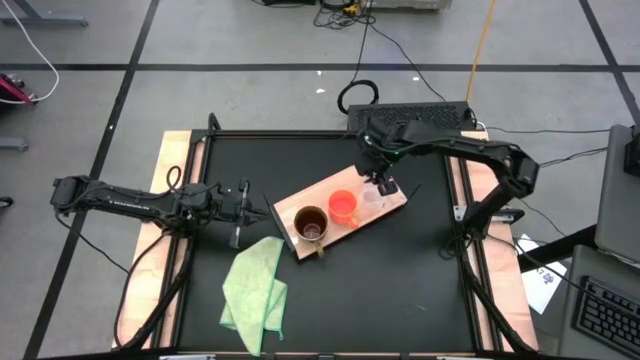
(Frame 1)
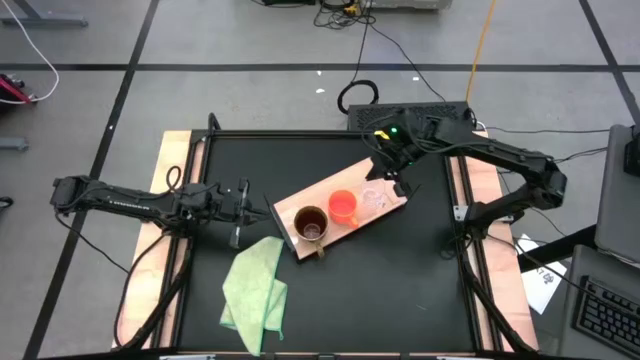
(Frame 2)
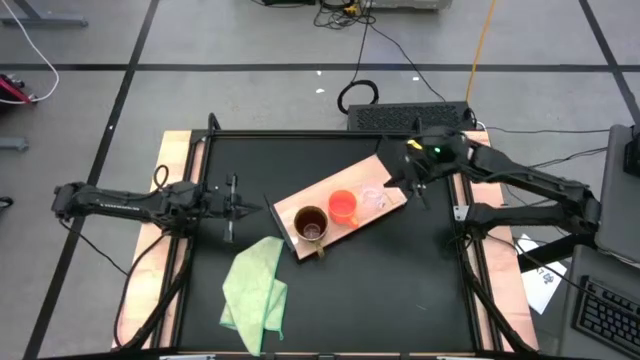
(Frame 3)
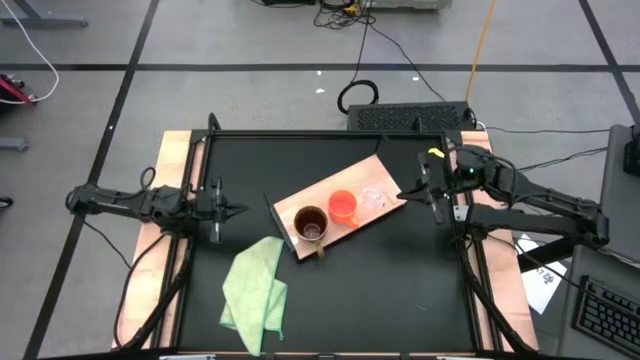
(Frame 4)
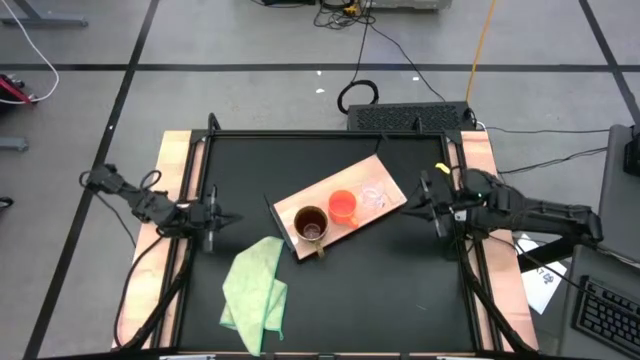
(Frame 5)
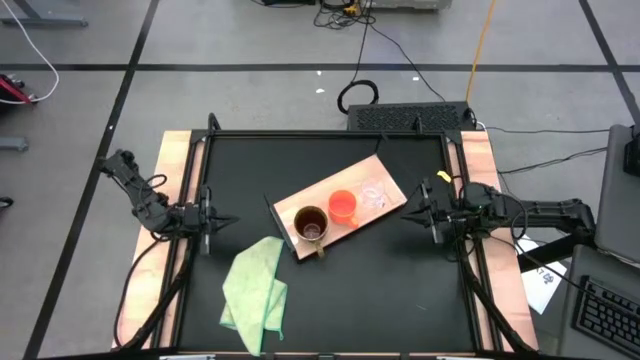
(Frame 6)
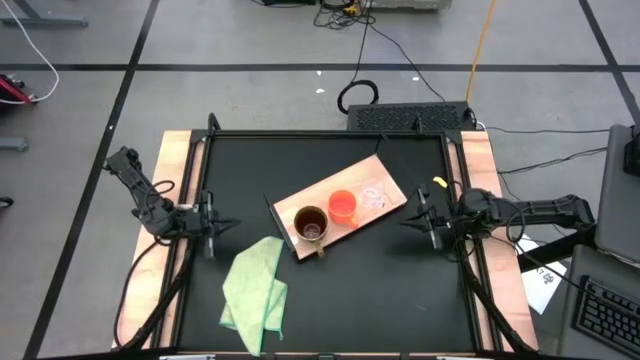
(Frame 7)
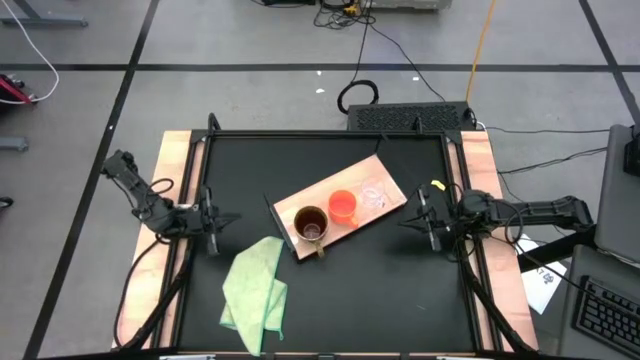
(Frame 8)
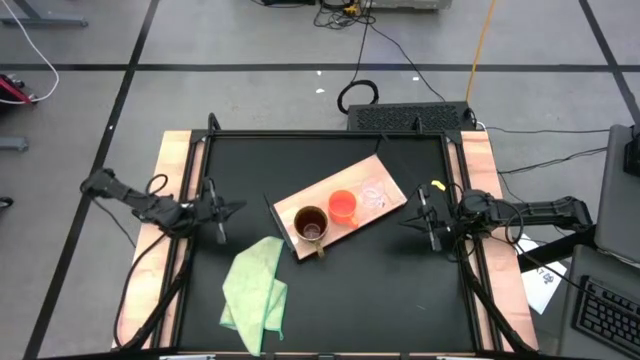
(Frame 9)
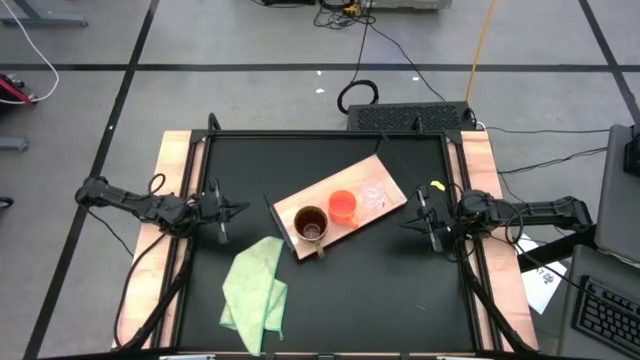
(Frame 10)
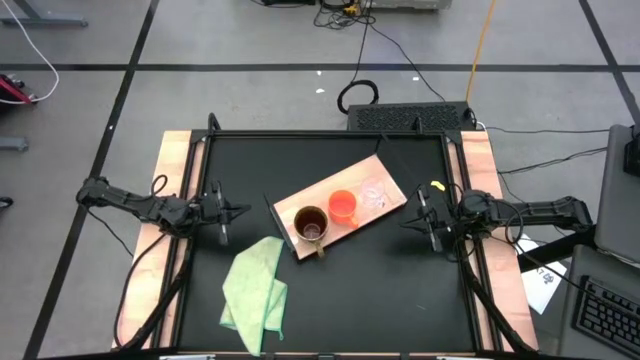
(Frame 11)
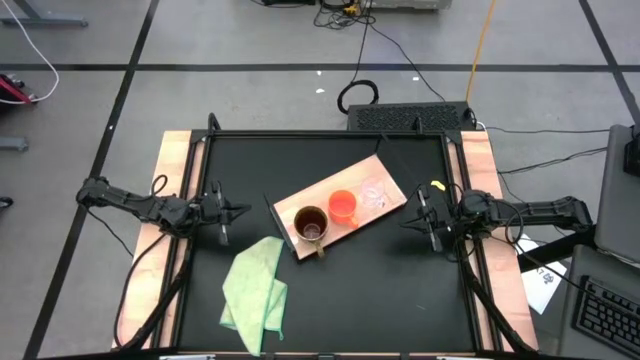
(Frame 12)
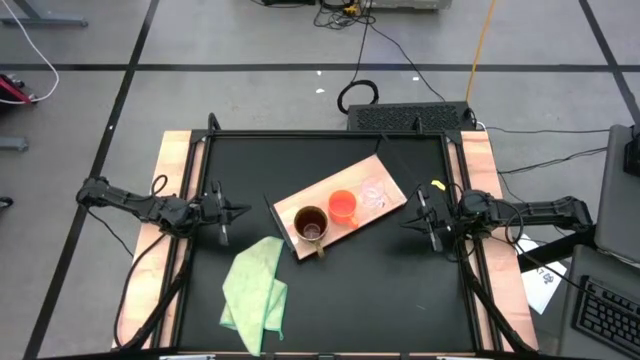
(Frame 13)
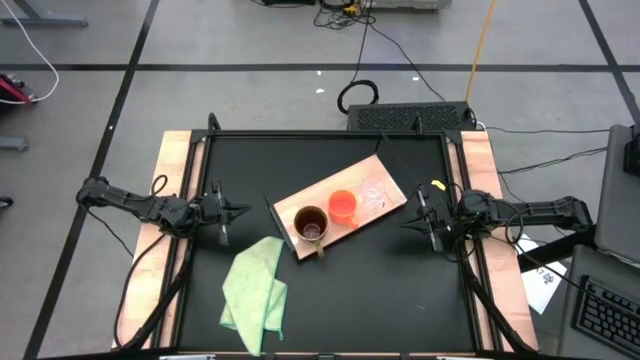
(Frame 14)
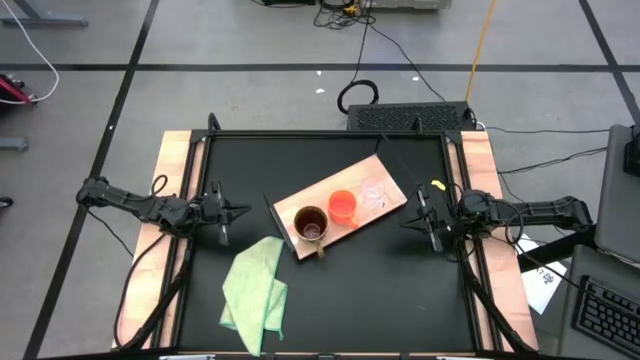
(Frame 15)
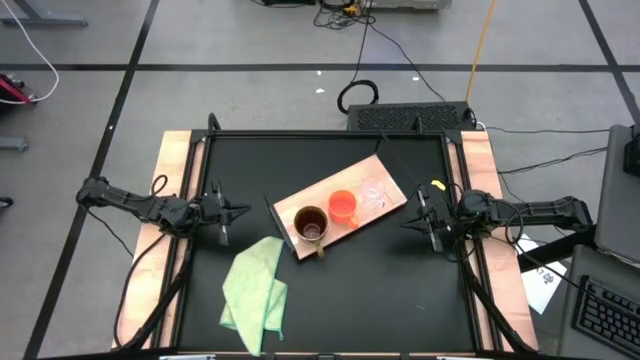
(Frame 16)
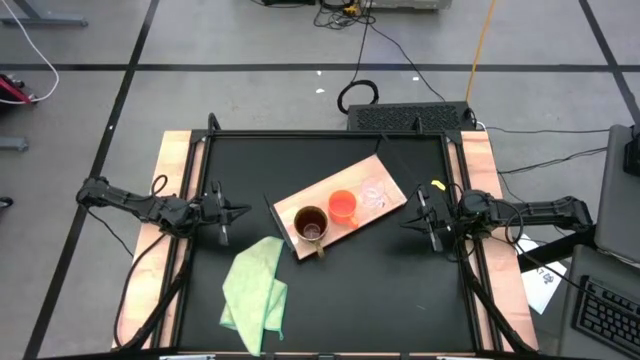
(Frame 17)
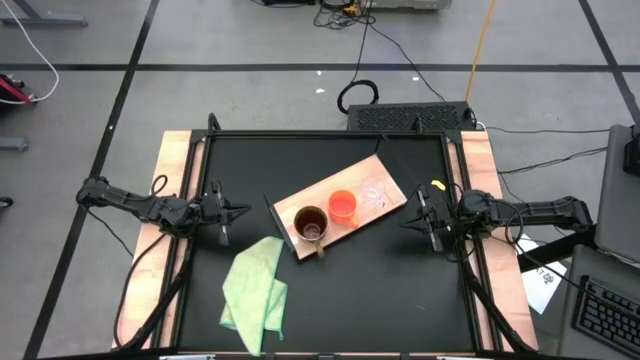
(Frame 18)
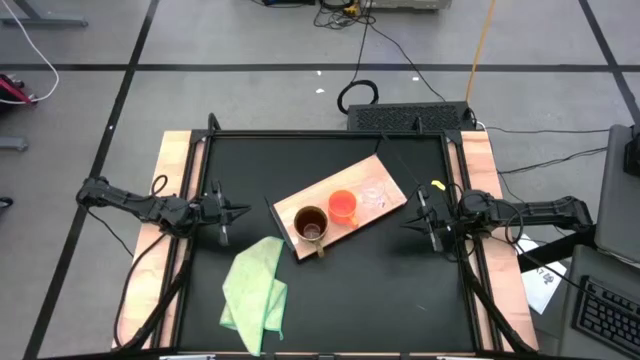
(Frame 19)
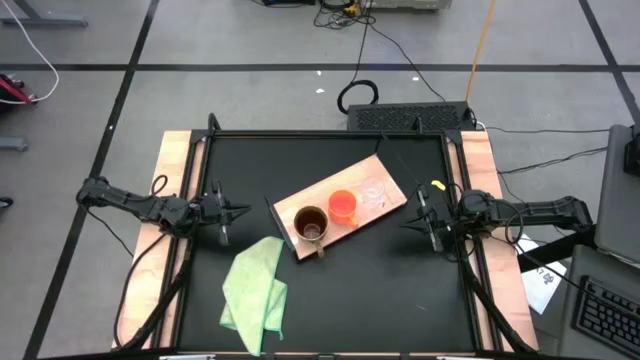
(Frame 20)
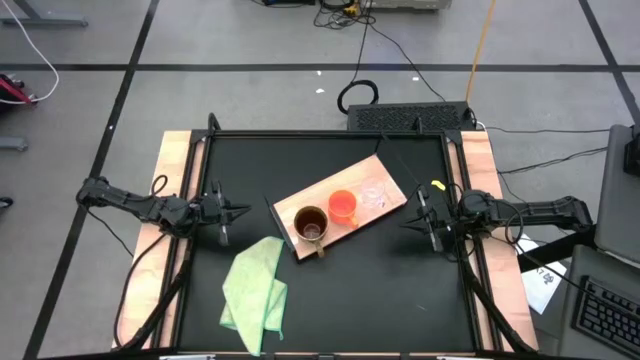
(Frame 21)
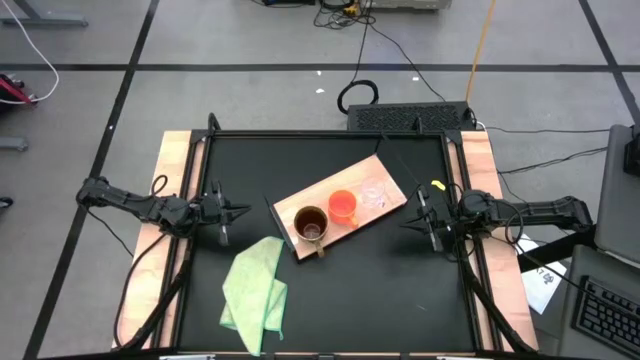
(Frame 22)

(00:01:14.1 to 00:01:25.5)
Task: Stack small to large cups/mugs on shelf
Return to Home Position

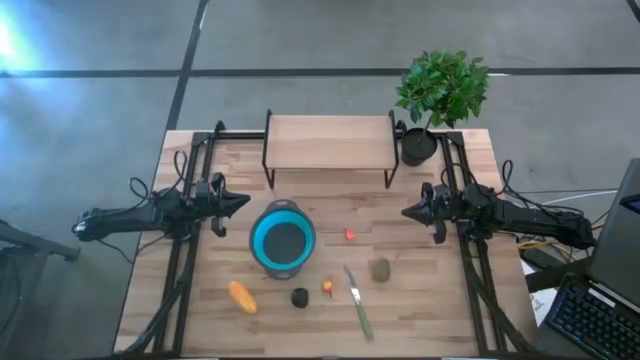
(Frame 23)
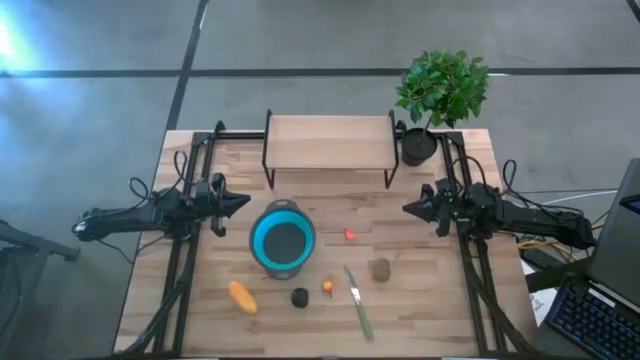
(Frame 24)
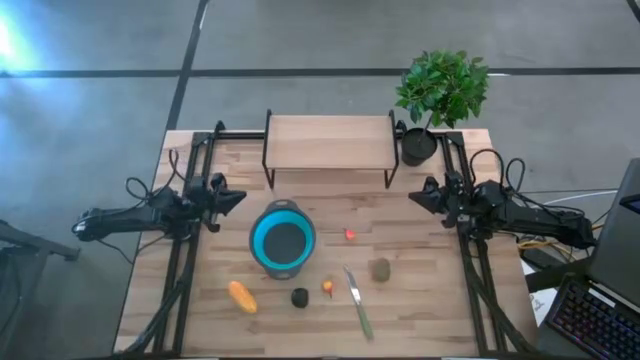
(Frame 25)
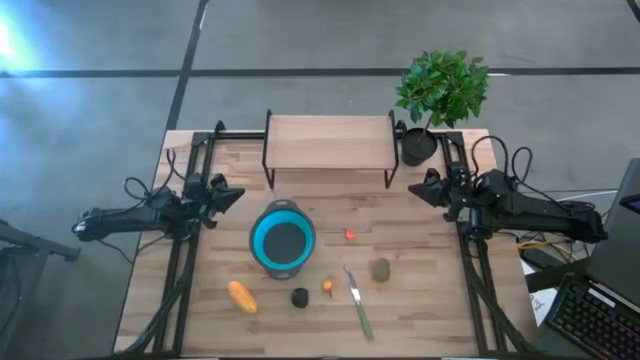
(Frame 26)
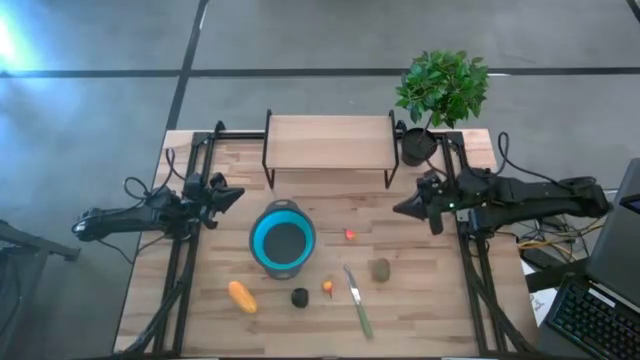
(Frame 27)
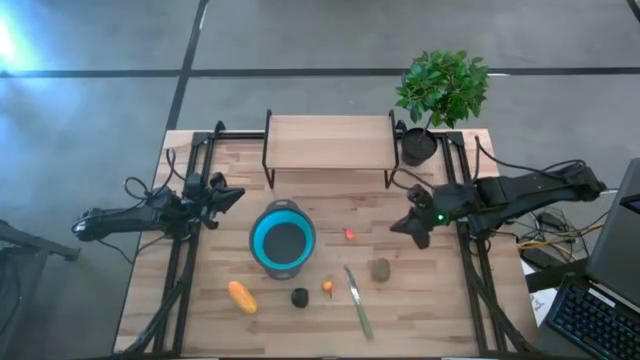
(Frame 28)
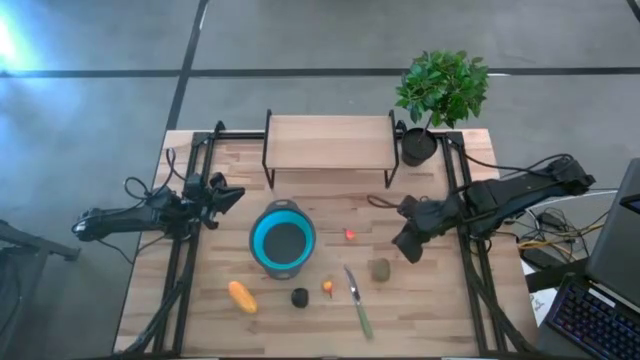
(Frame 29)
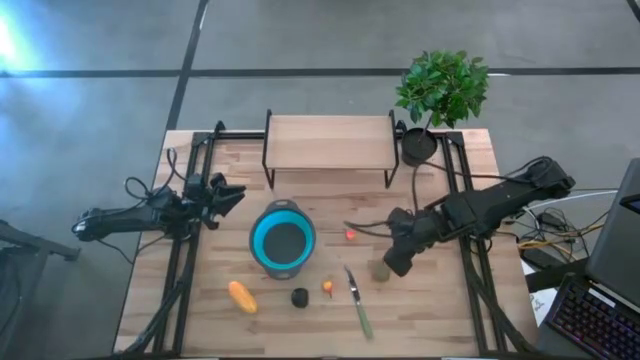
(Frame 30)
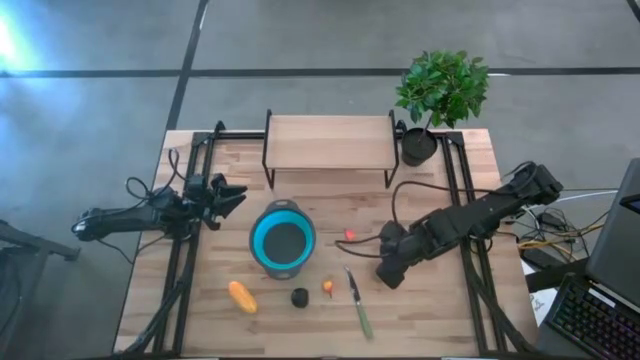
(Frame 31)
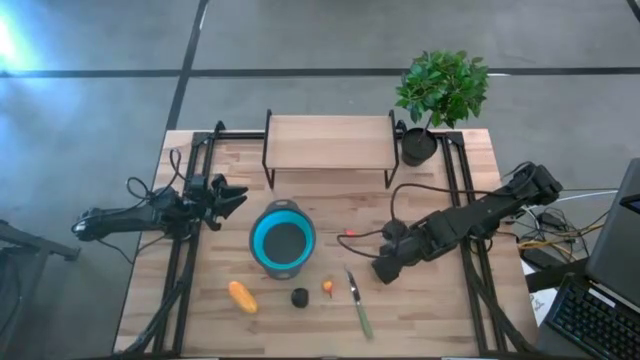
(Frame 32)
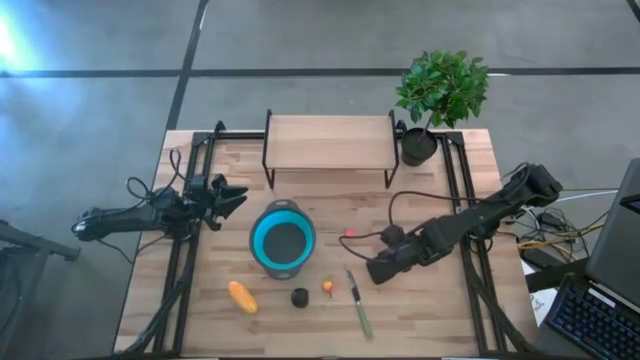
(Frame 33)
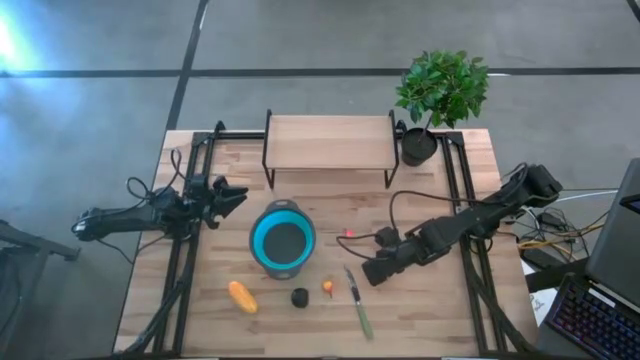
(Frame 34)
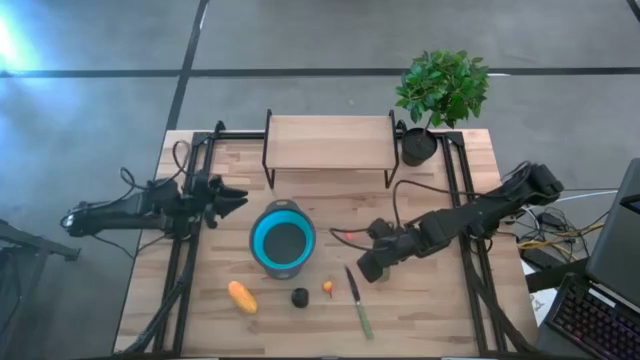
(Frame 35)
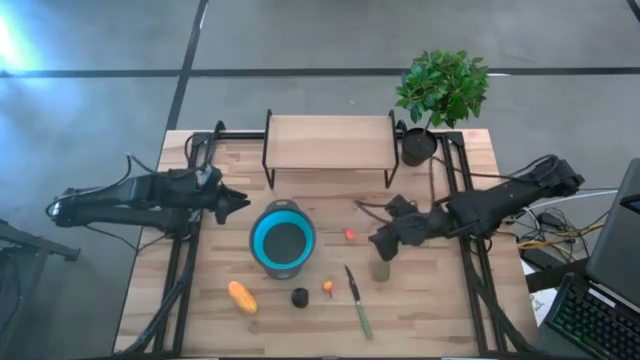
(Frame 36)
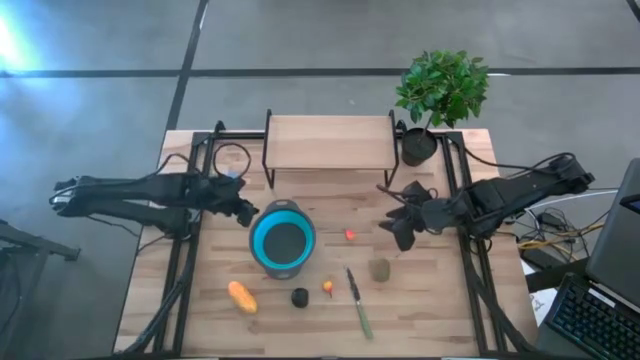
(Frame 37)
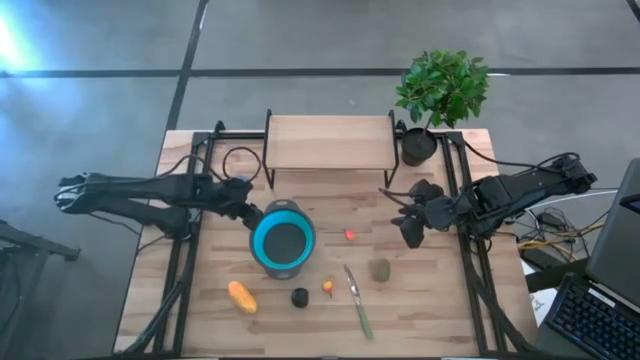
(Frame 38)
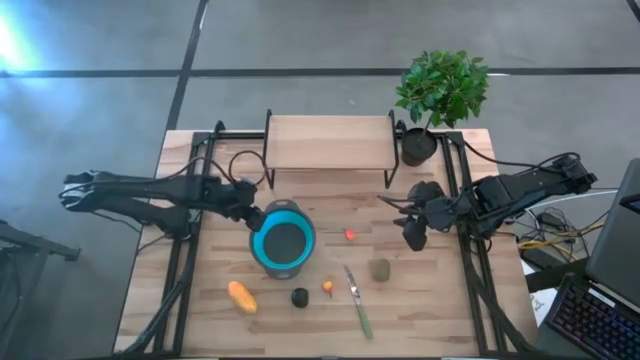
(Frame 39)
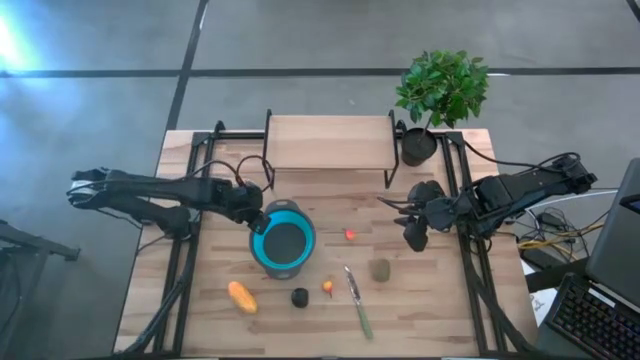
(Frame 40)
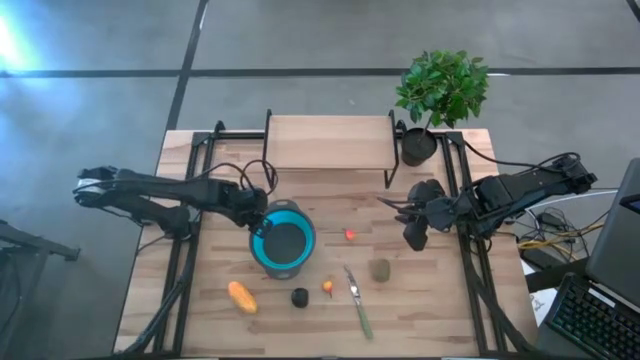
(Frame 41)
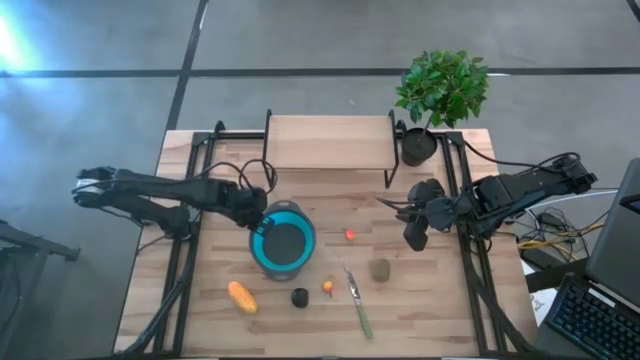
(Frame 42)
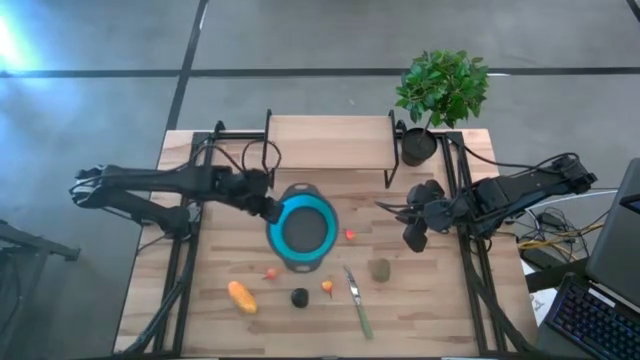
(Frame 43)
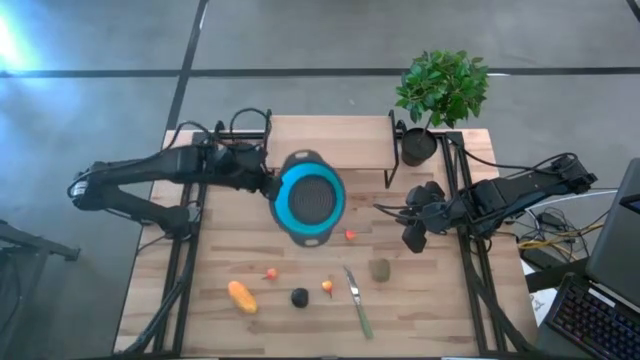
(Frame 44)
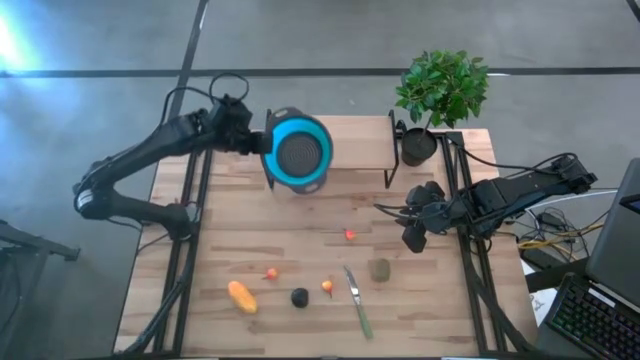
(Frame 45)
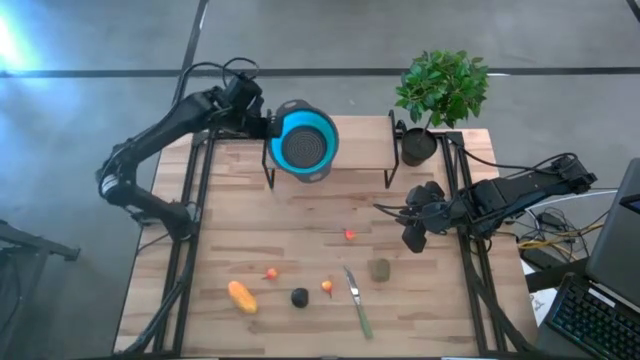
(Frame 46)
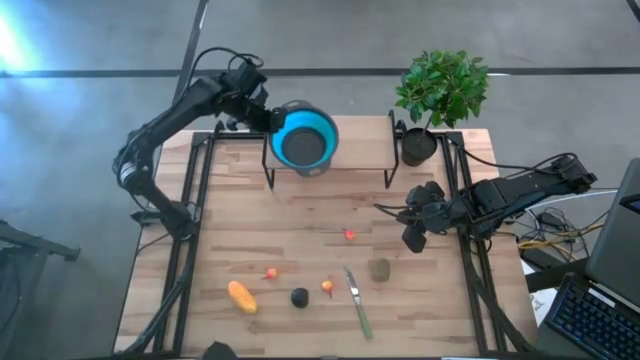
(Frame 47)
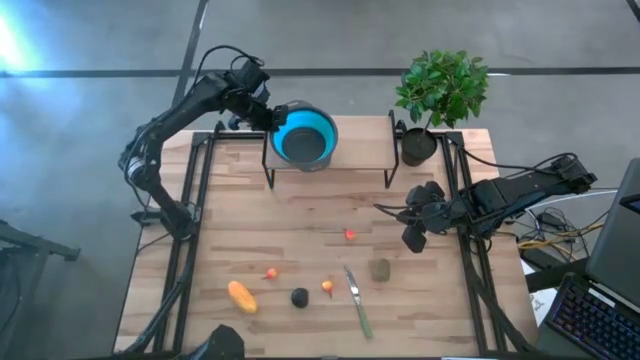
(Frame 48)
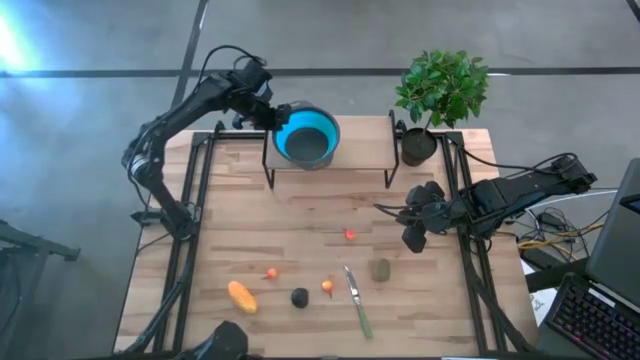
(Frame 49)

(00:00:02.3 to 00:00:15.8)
Task: Pick & Place Fruit
Put the blue strainer bowl on the shelf
